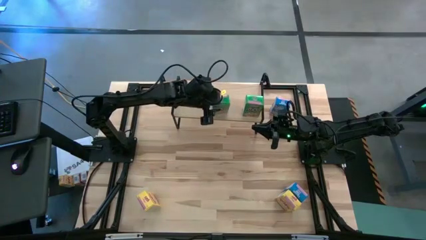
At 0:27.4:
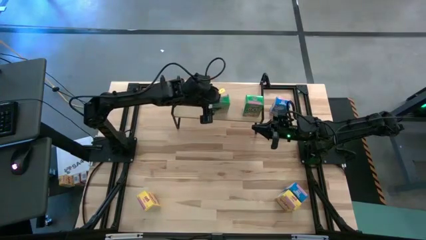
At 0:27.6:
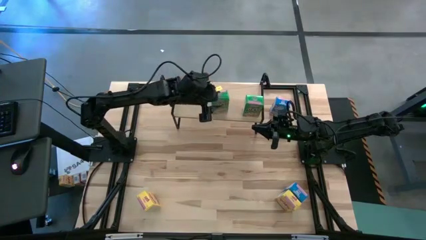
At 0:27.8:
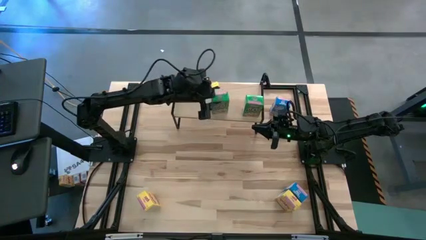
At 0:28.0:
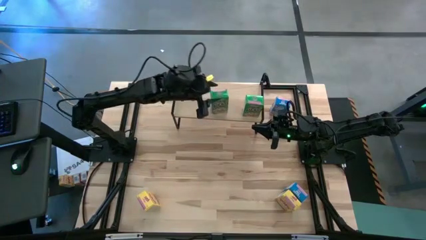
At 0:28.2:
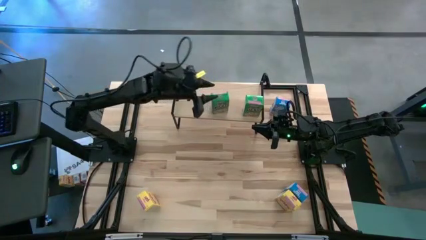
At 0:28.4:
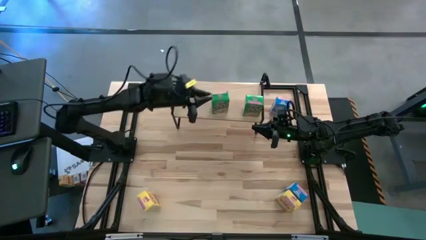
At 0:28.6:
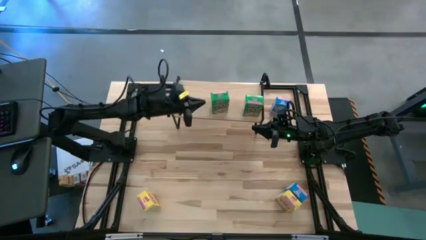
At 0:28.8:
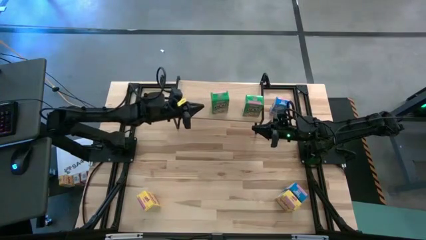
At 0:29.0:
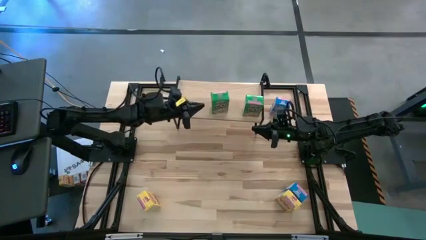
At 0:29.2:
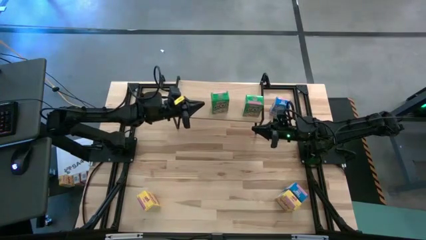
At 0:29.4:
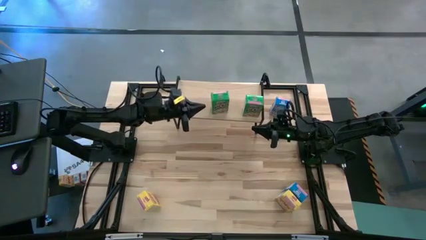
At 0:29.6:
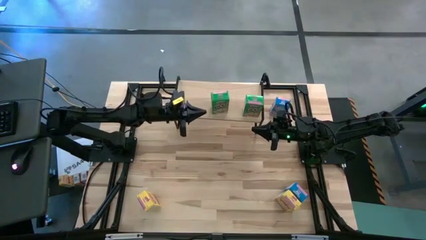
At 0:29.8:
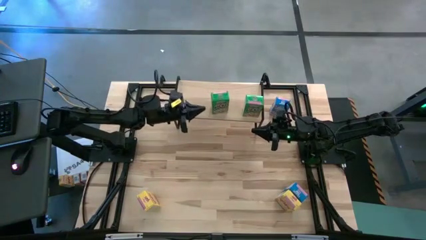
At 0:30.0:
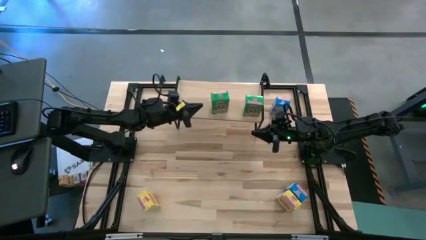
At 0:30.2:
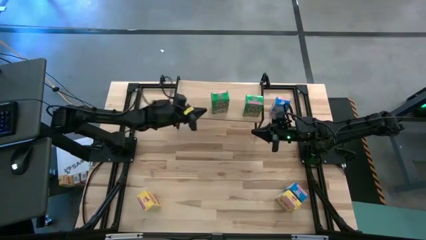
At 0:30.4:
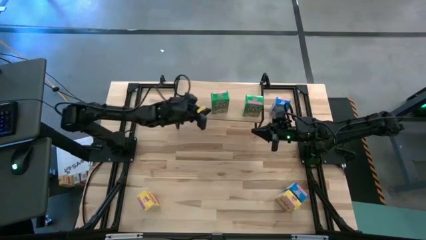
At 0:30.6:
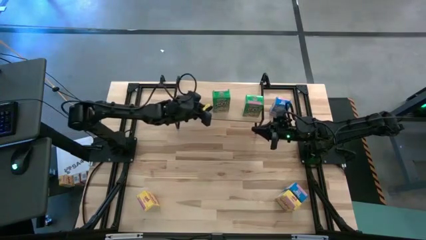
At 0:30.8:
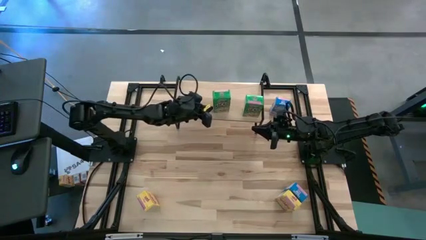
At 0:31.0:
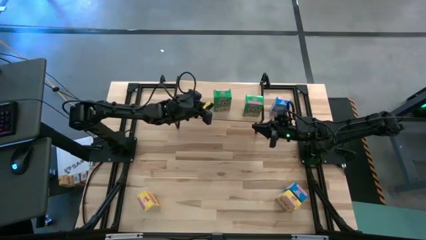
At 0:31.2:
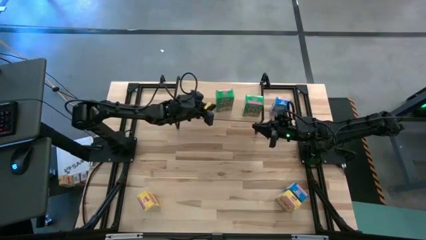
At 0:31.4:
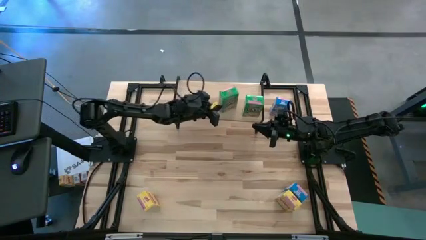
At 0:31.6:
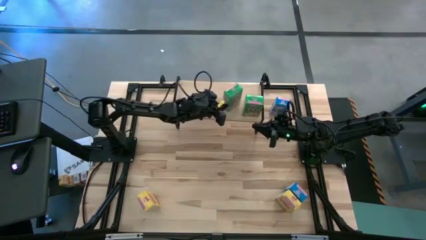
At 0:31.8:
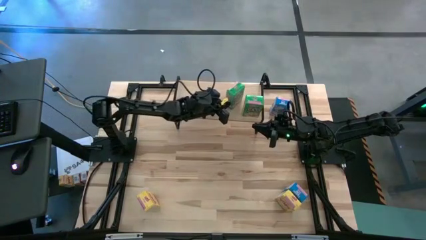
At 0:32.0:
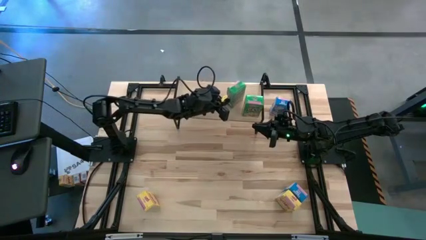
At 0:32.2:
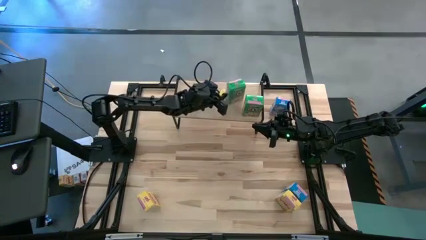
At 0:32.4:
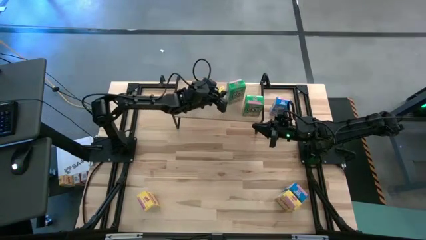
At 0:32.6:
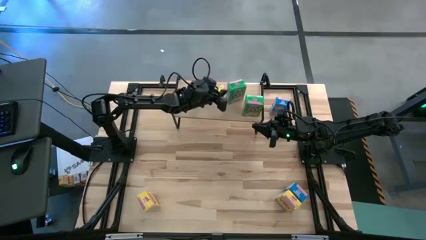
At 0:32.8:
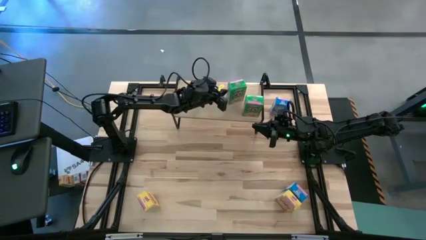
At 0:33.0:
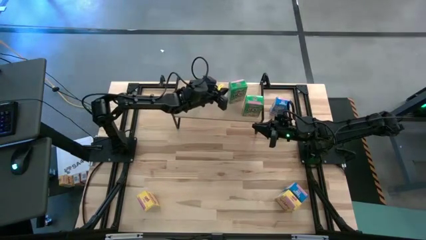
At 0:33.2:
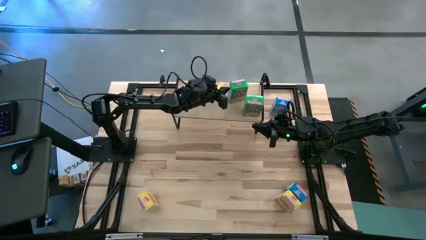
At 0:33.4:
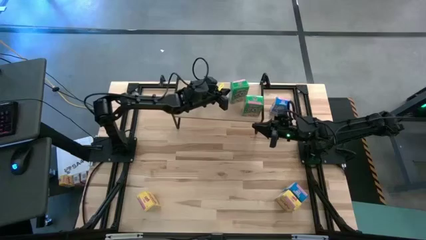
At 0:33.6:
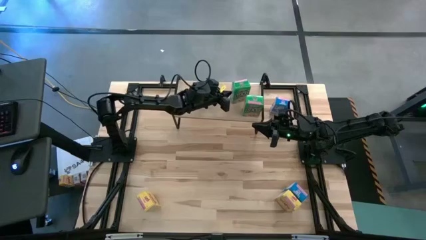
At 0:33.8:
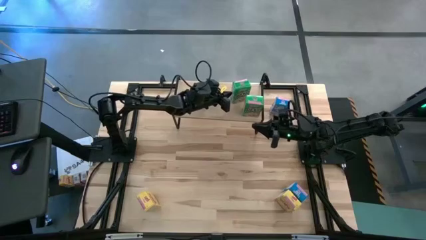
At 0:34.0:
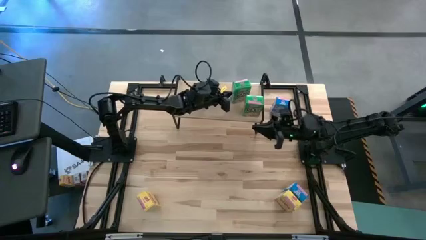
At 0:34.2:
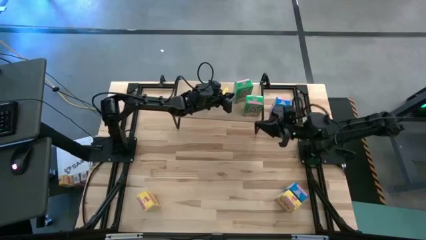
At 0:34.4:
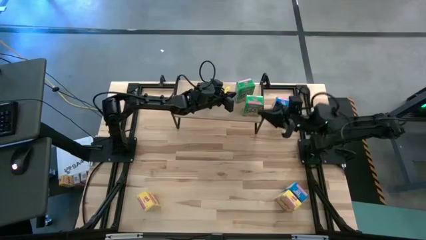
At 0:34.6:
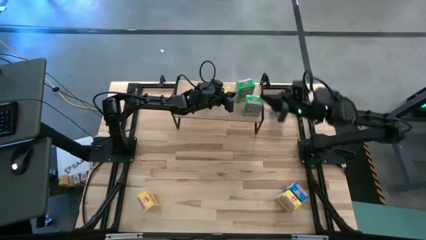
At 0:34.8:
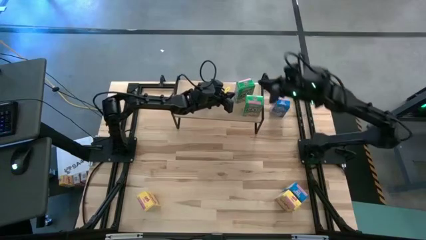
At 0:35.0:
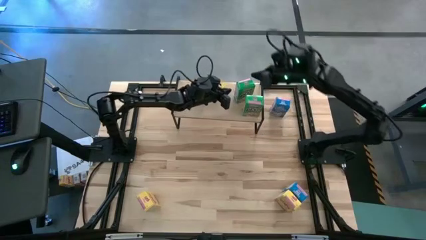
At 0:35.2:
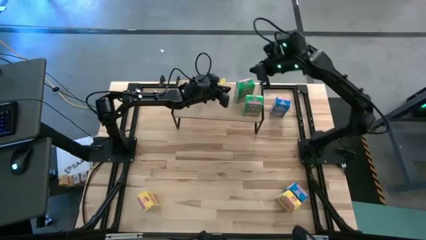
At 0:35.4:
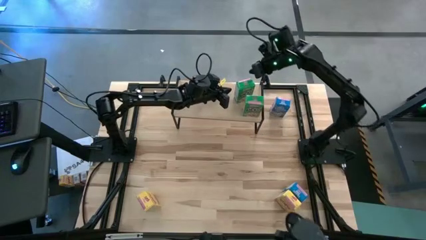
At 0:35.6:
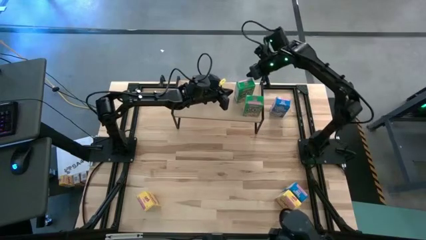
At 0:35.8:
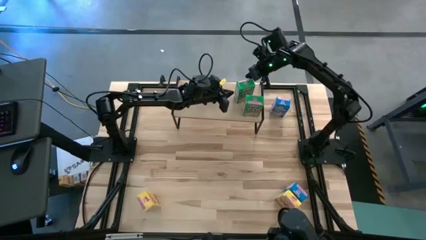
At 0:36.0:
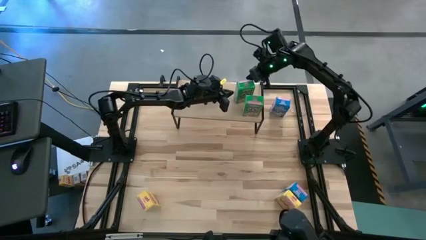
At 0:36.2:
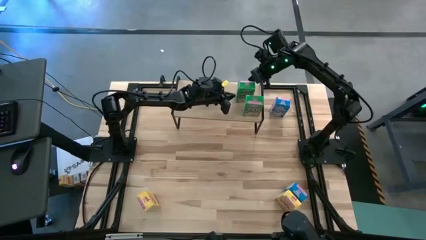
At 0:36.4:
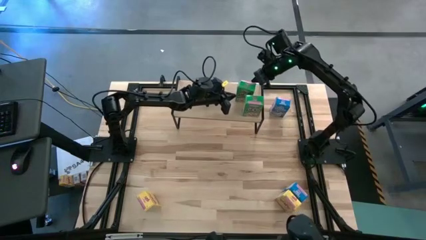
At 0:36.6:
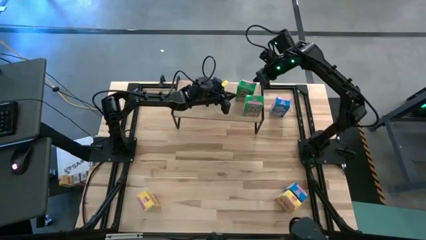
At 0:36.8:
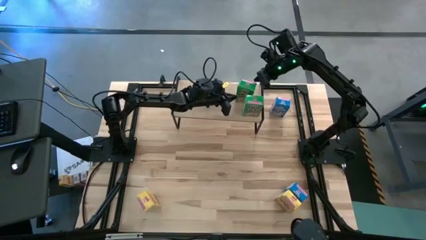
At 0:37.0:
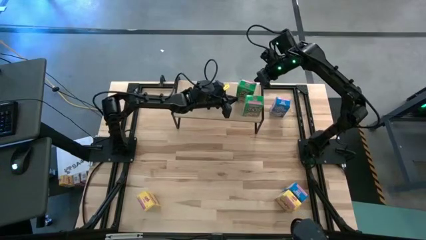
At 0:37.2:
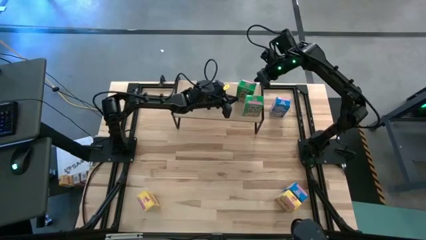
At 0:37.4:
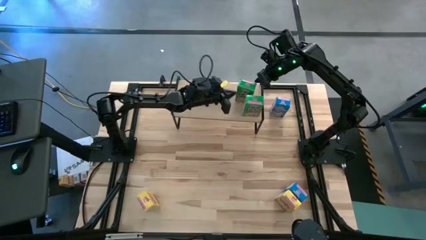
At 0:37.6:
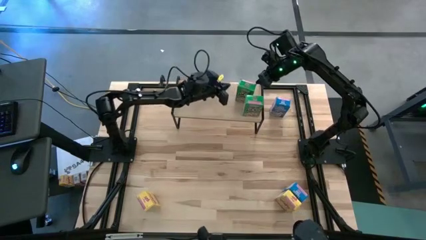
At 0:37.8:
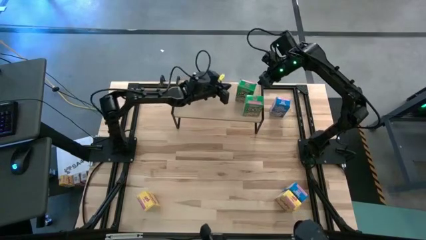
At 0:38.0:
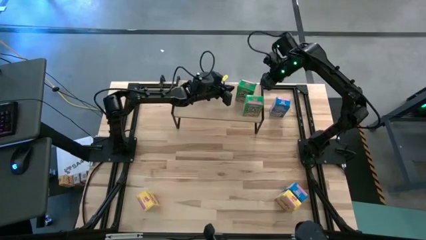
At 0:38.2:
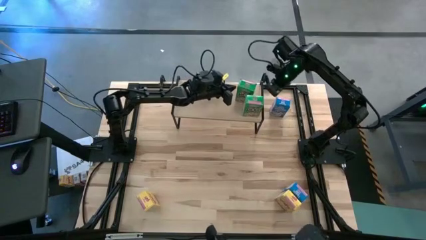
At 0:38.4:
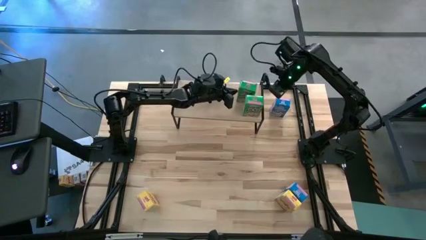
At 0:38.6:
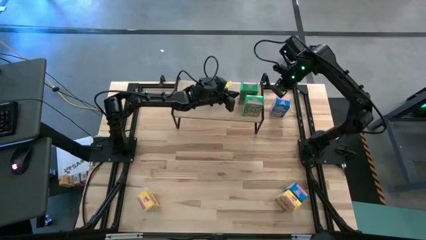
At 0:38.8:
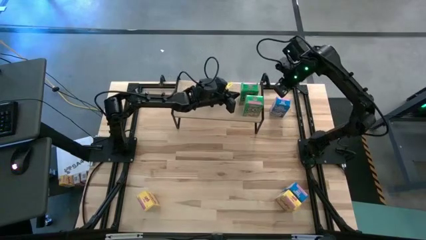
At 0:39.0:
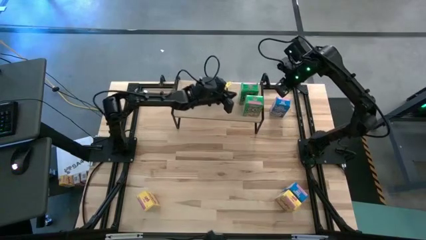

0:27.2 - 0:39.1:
Task: Stack cereal on shelf
Put the green cereal box on the shelf aligned with the other green cereal box
